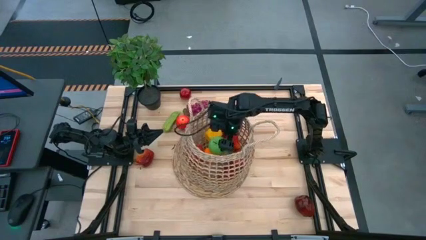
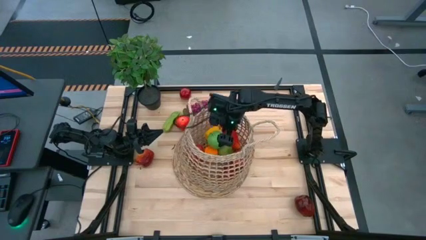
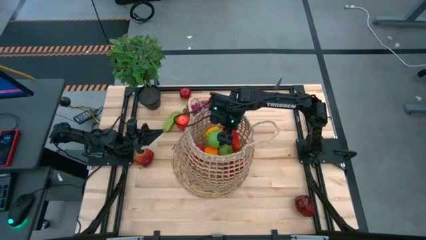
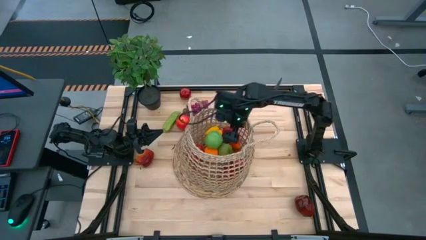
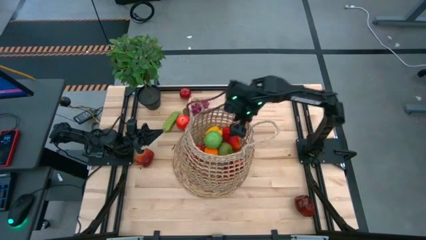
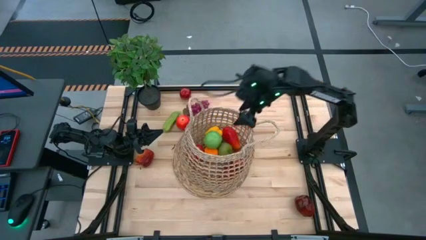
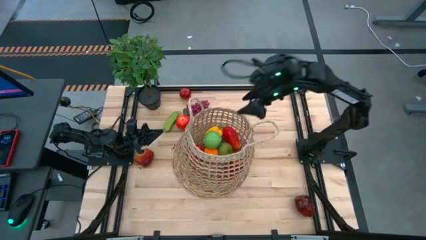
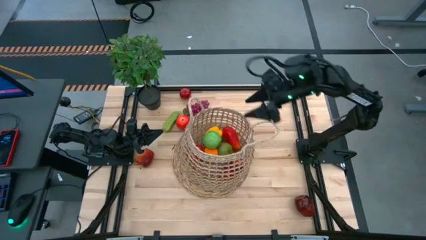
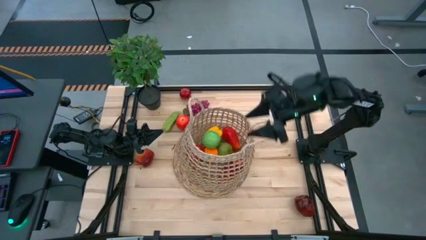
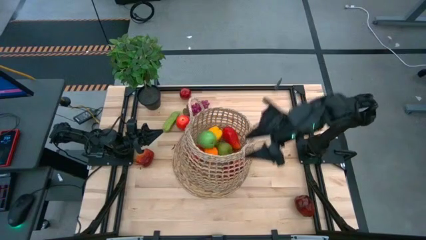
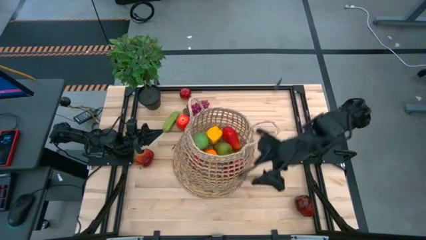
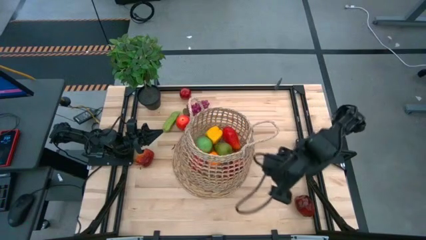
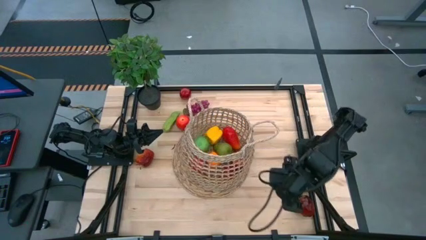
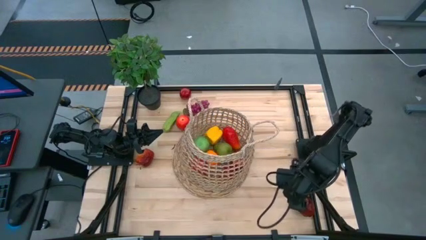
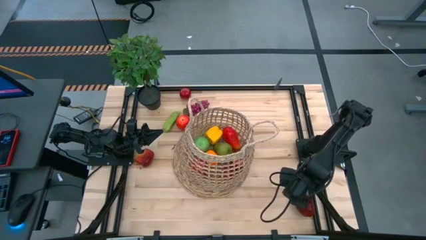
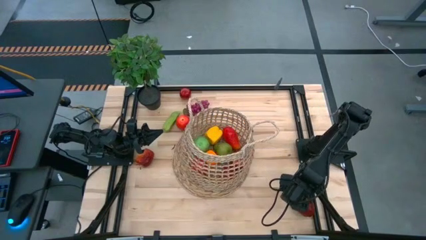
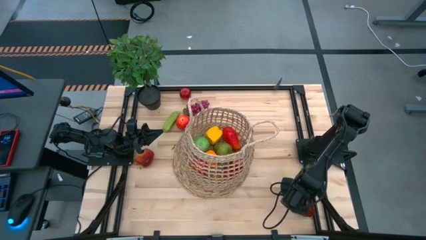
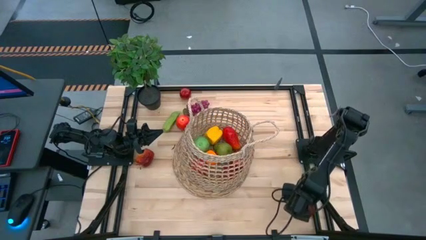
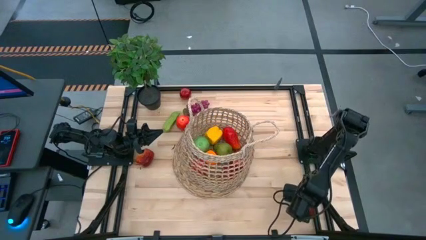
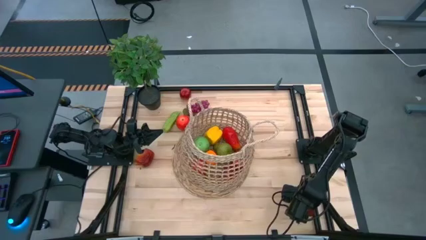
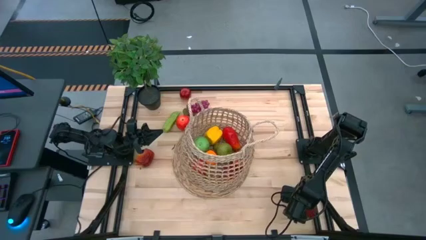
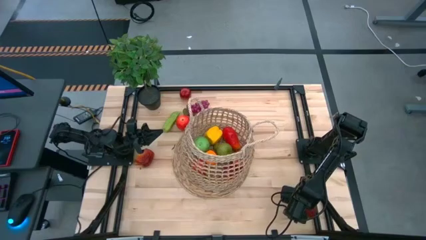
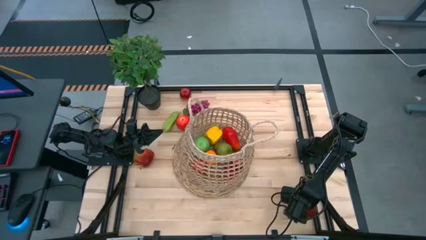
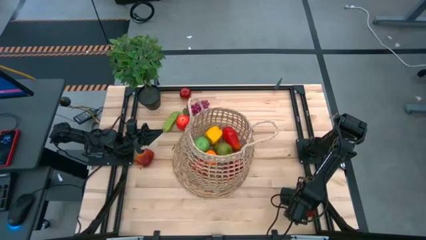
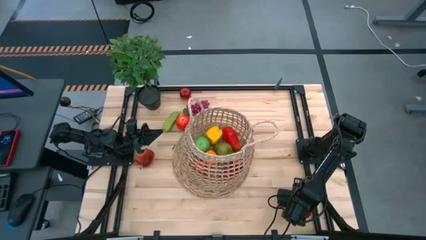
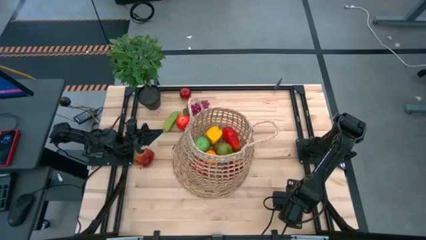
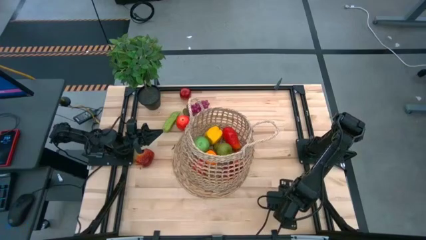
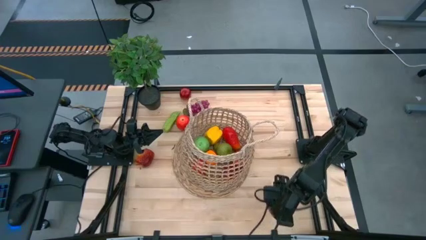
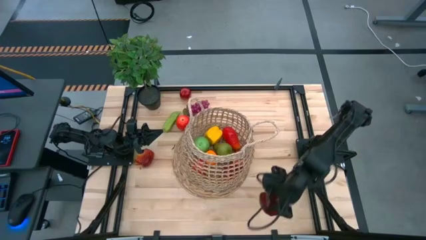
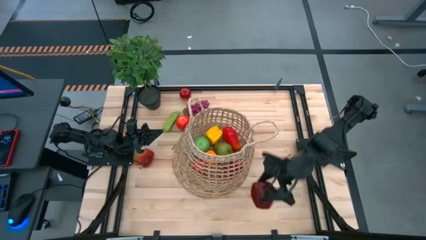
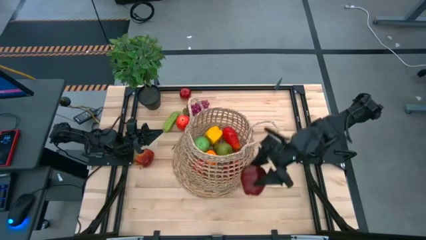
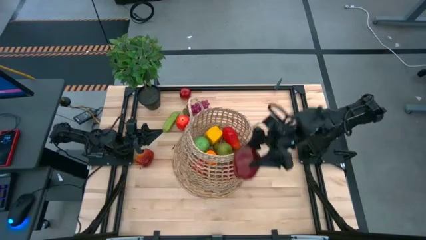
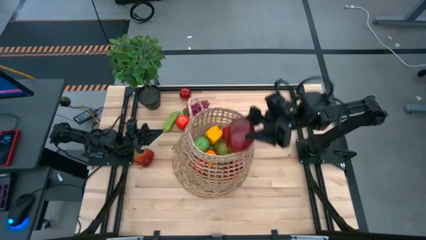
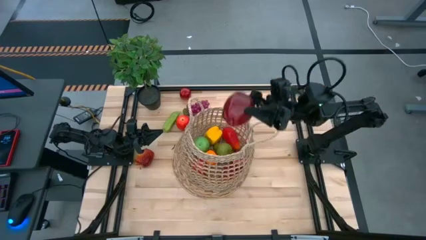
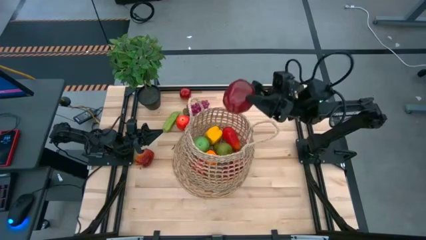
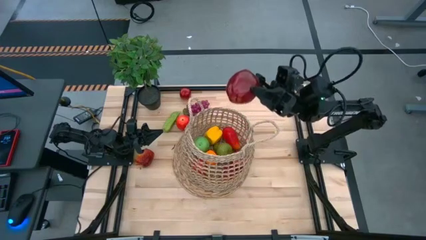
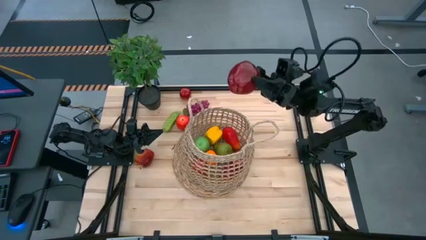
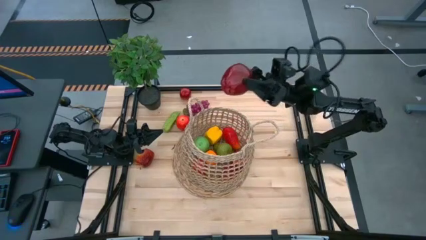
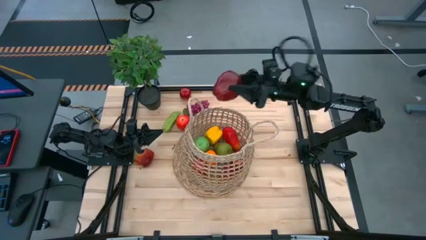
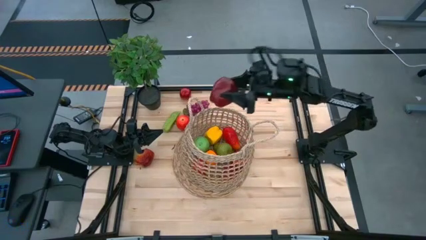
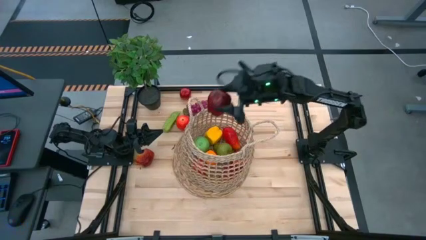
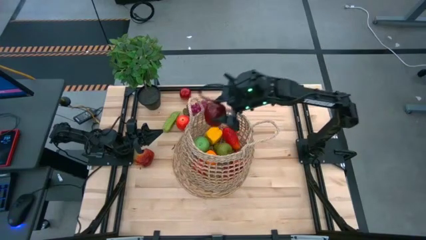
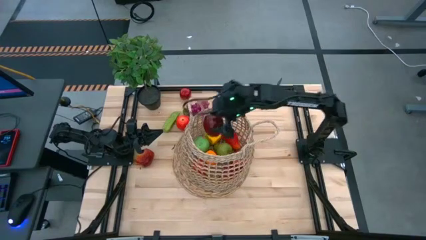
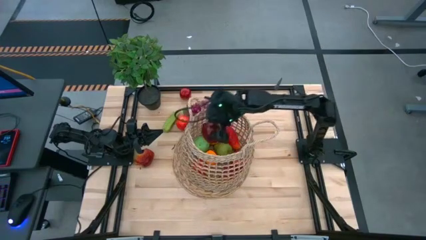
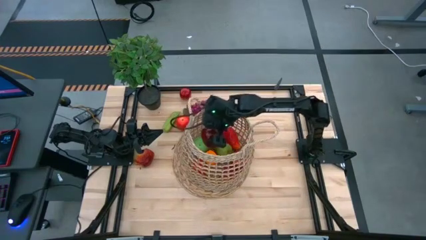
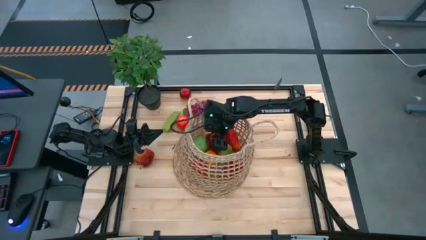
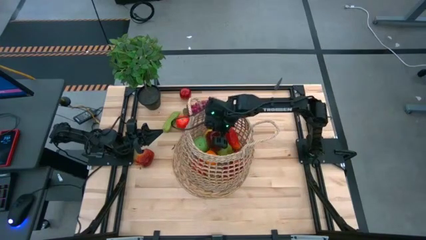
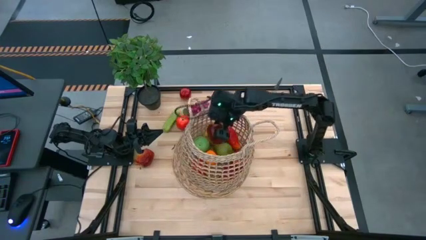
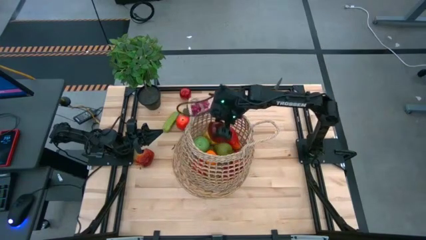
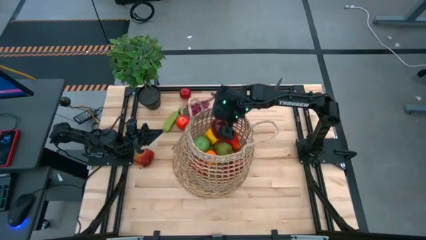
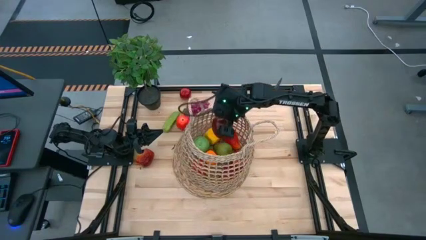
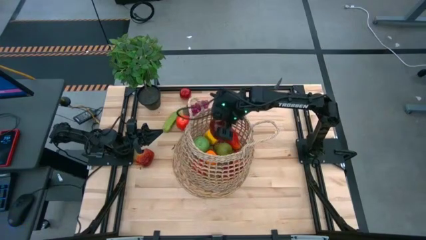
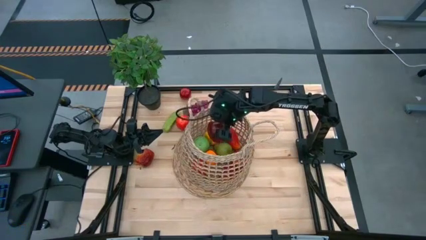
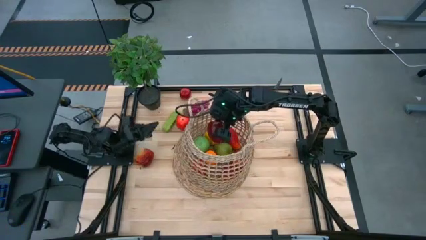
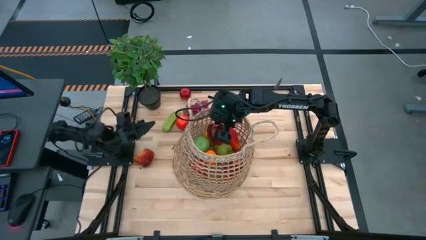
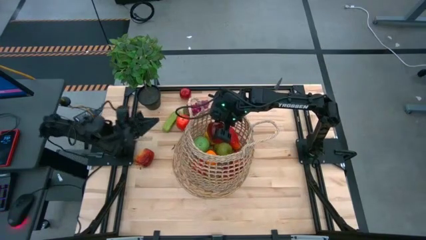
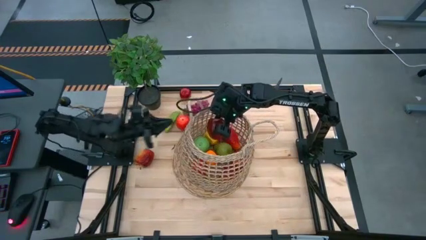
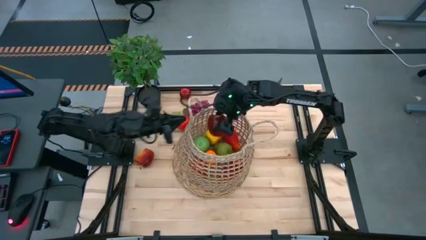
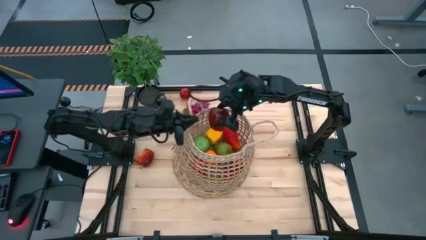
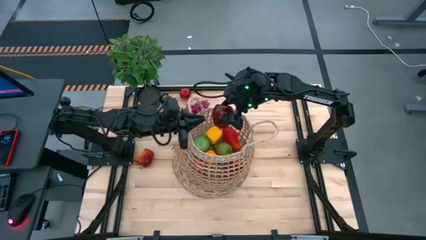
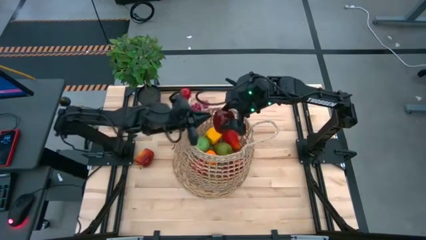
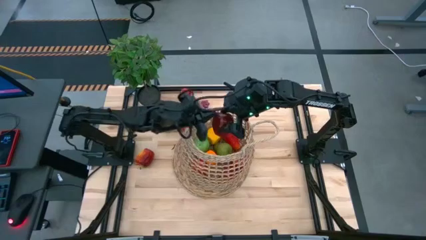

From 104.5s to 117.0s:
Task: Build produce basket
Put the red apple into the brown basket

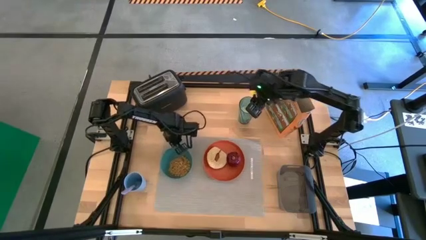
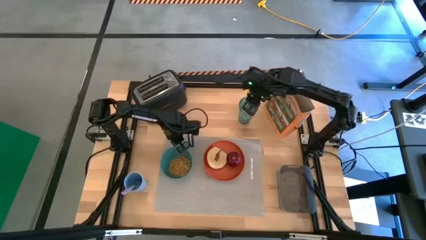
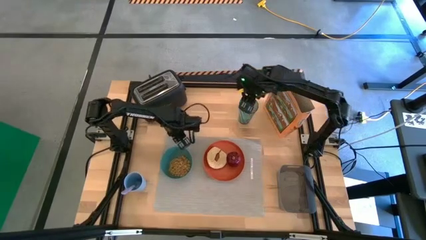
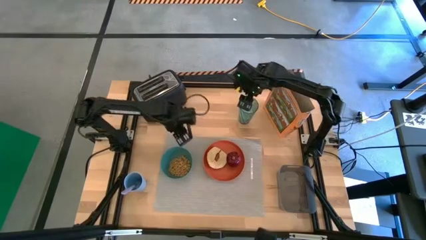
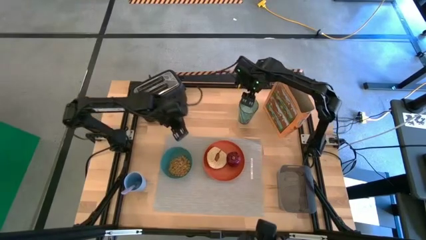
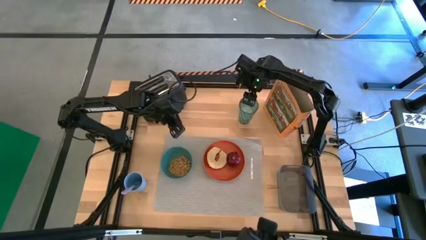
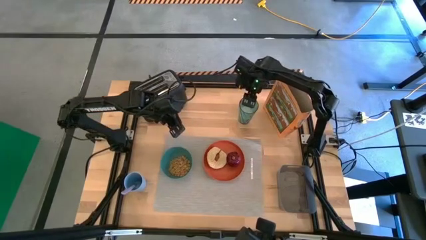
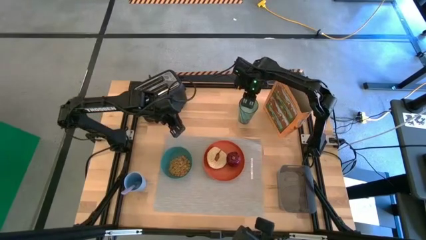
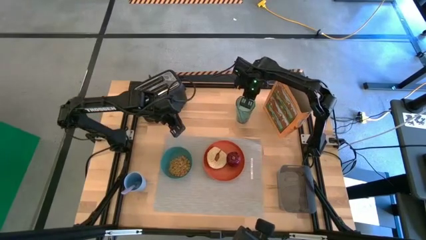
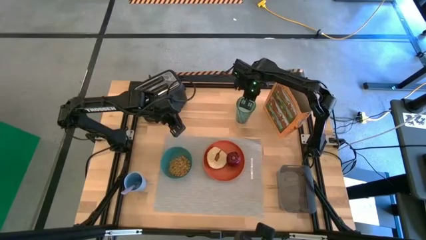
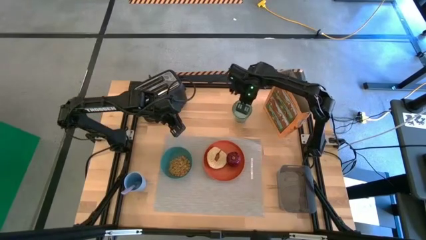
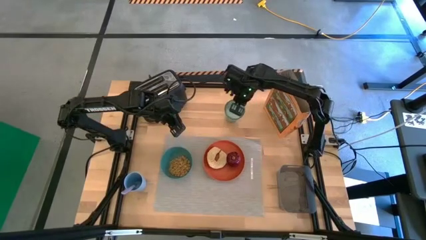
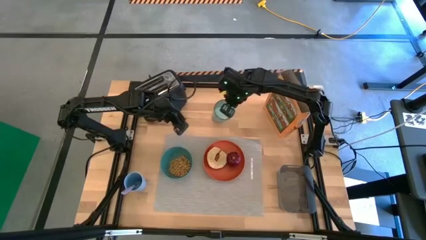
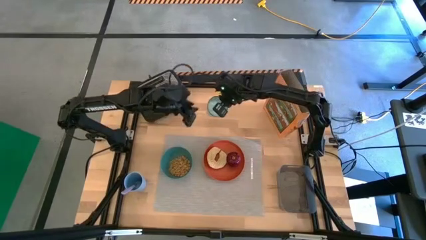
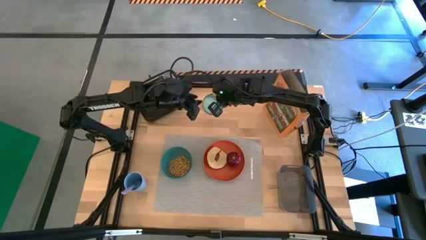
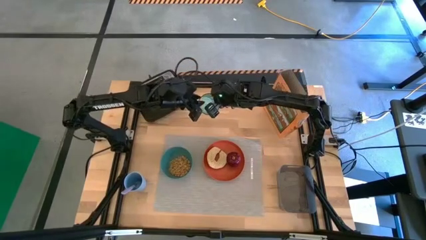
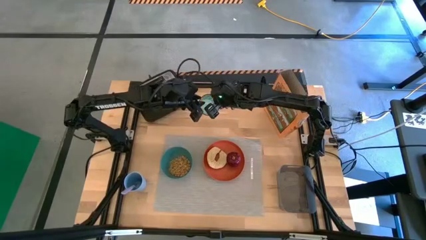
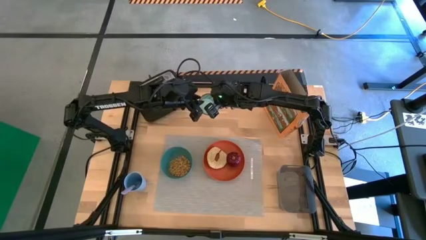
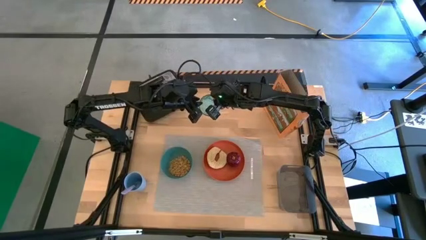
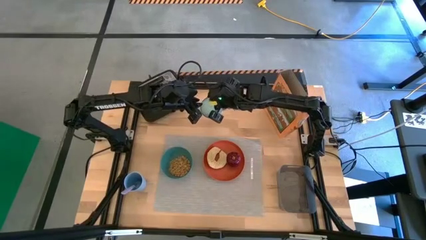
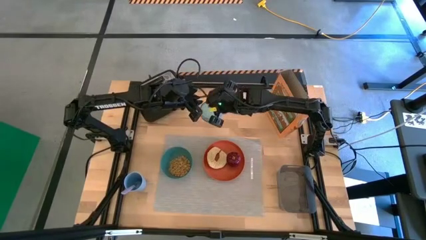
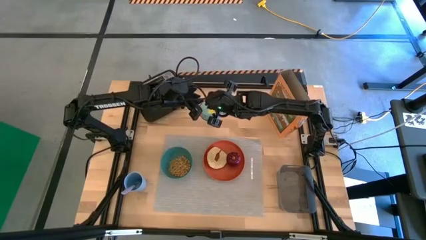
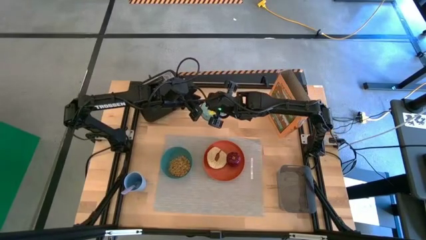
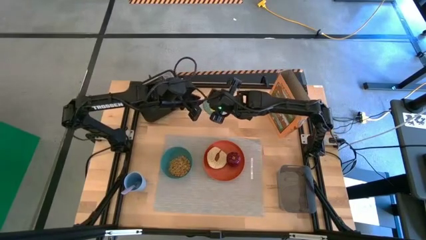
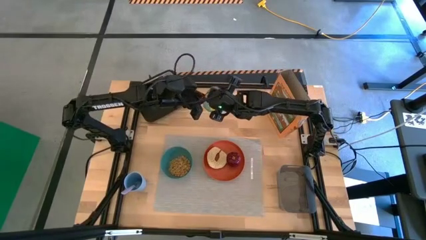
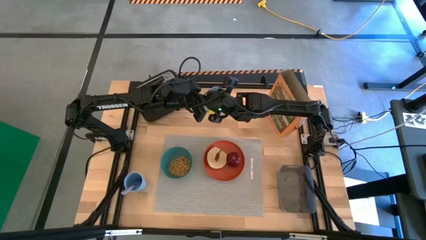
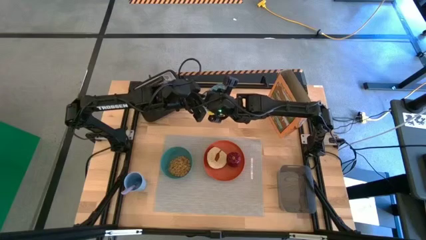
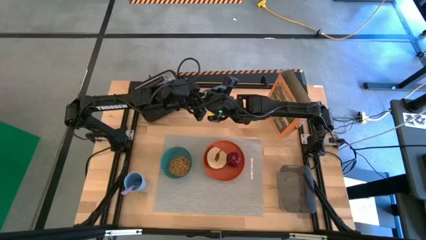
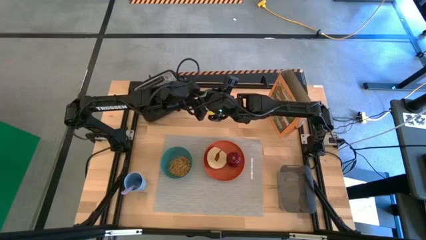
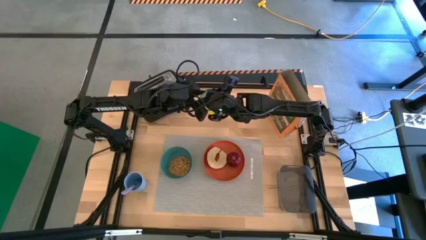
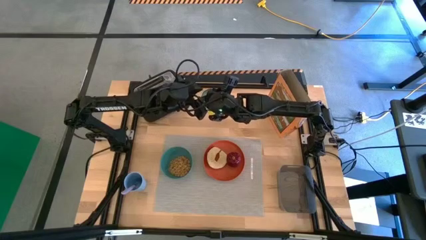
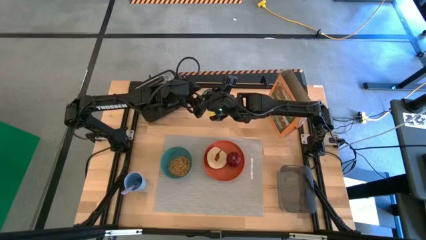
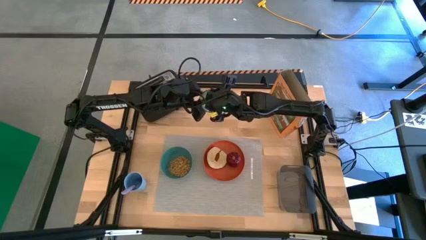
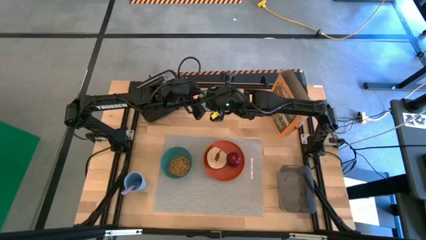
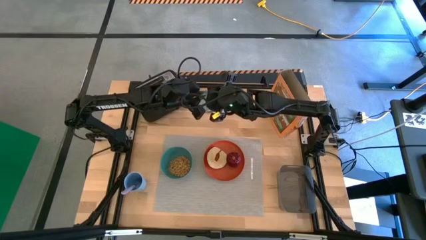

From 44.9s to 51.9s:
Task: Arrange a breakfast setting
Put the cup of rice into the top side of the tablemat
